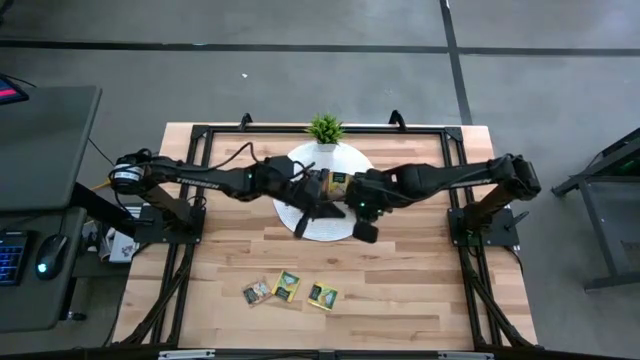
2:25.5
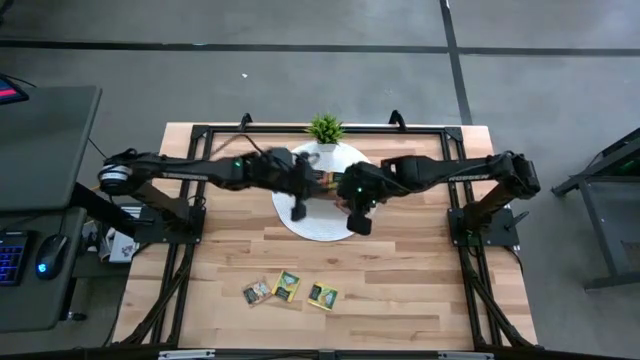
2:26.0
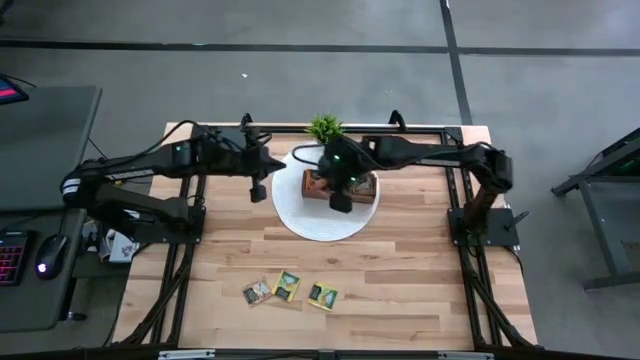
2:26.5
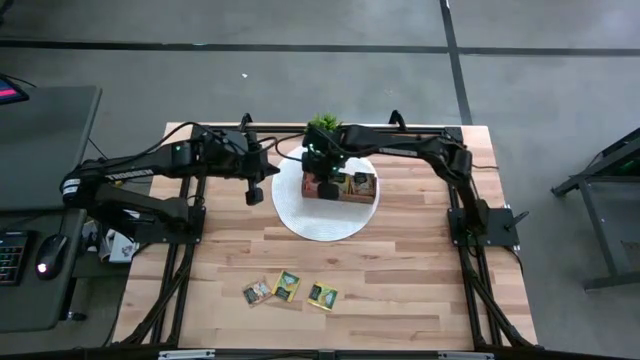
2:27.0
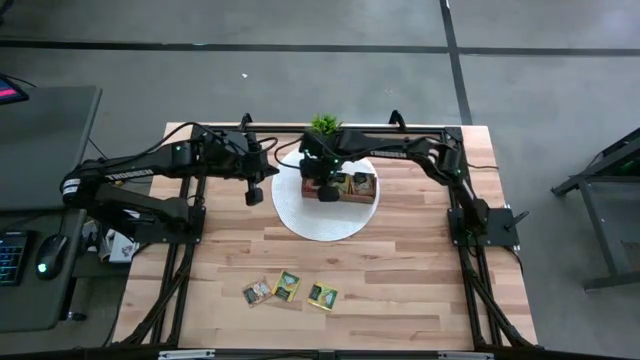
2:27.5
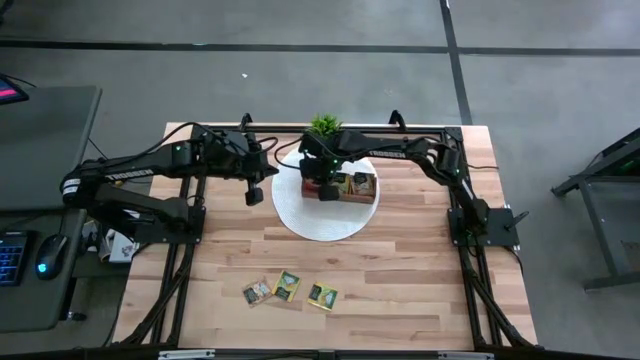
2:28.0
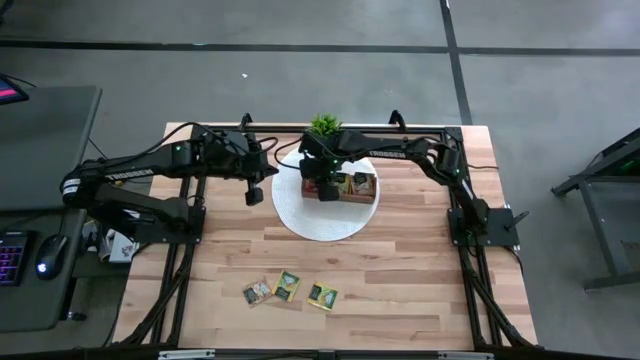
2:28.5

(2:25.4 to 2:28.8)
Task: Pick & Place Tea
Put the orange tea bag into the left section of the wooden organizer

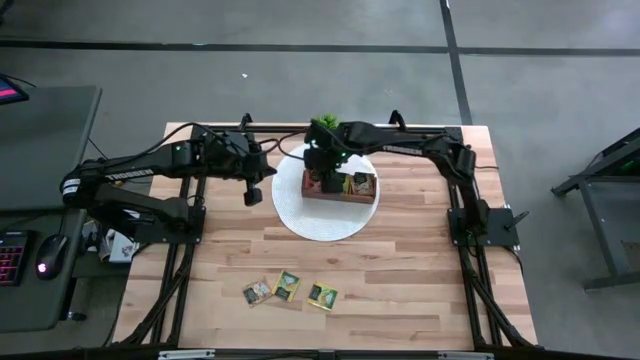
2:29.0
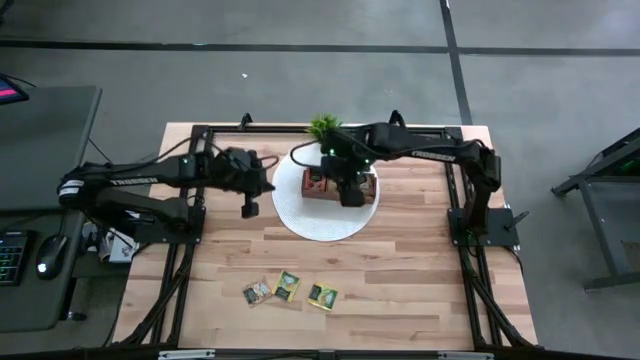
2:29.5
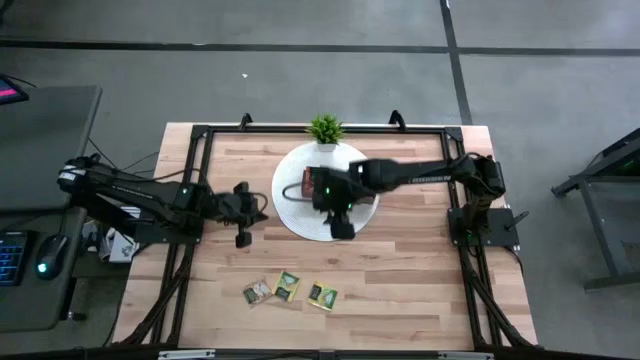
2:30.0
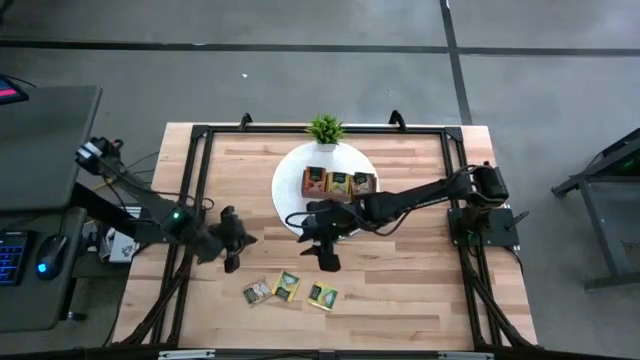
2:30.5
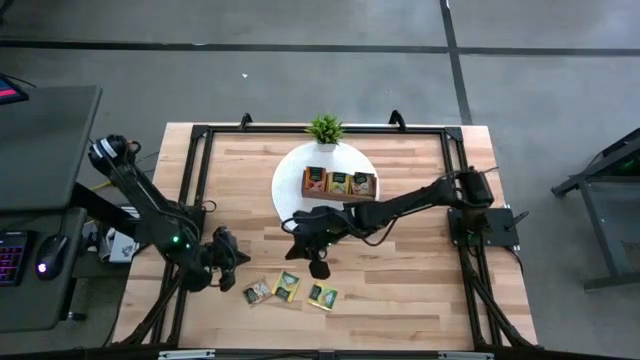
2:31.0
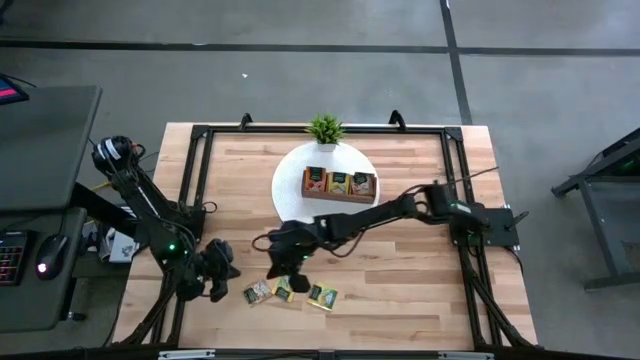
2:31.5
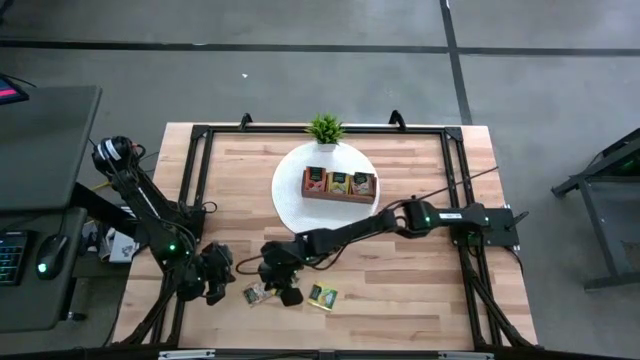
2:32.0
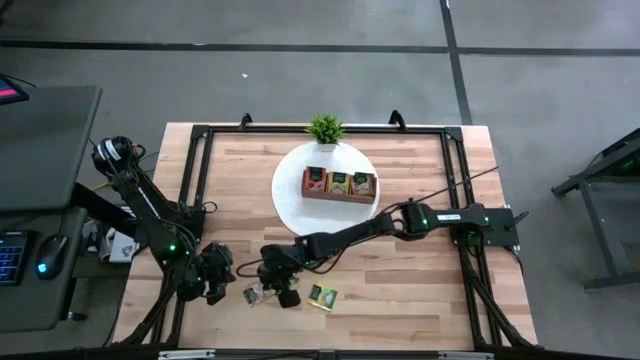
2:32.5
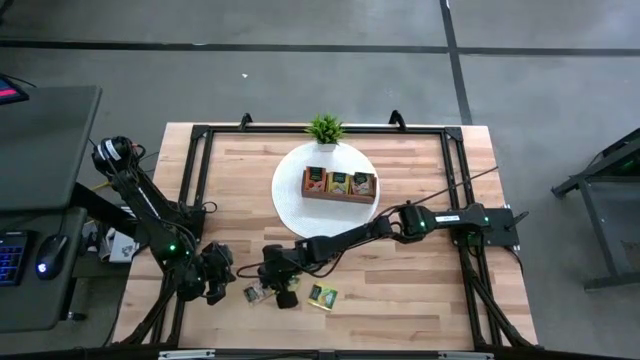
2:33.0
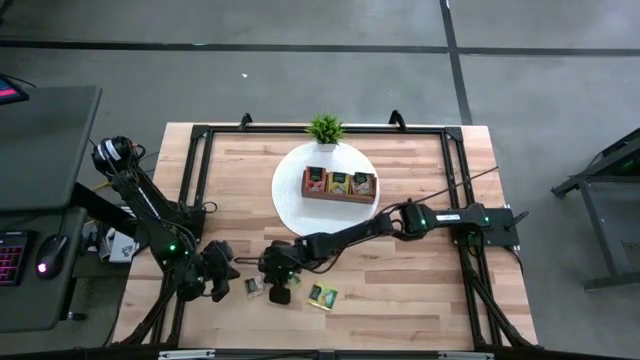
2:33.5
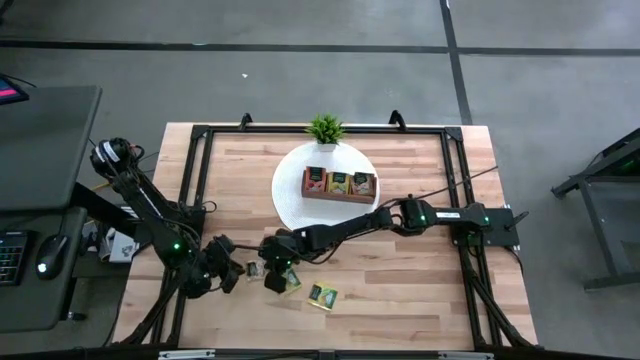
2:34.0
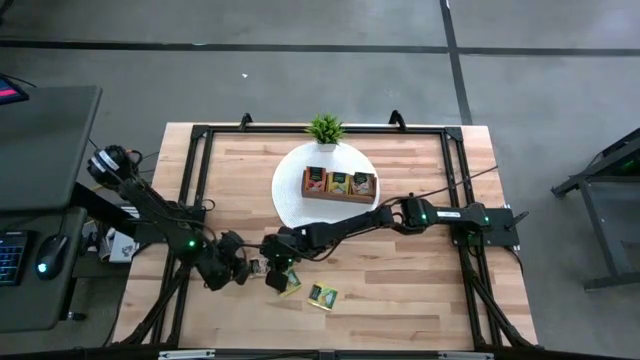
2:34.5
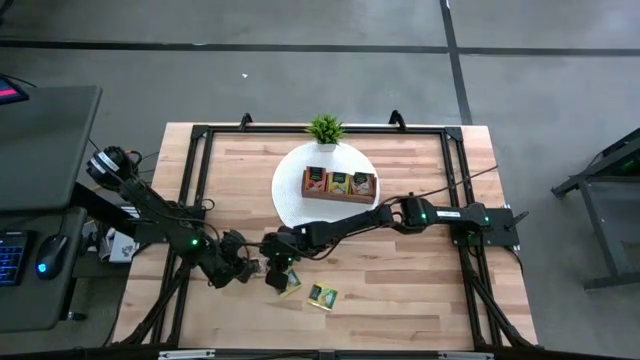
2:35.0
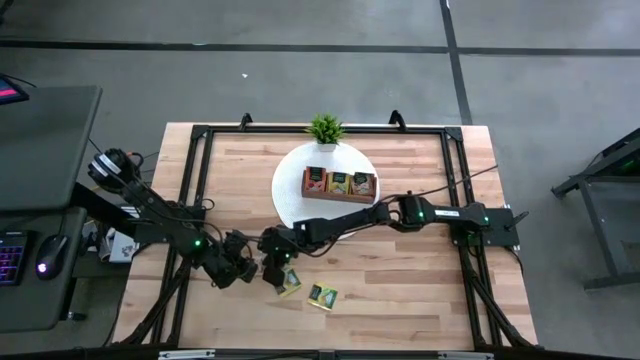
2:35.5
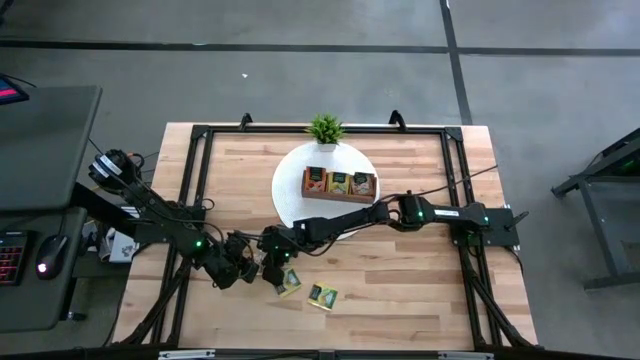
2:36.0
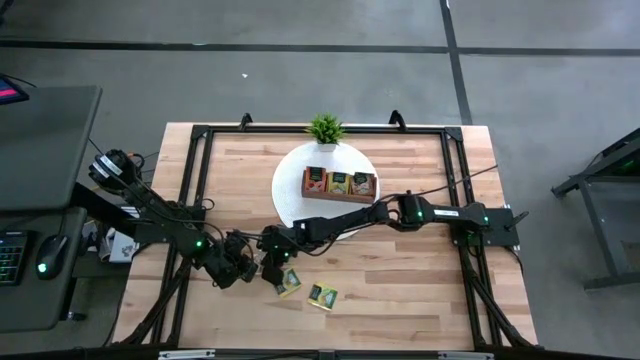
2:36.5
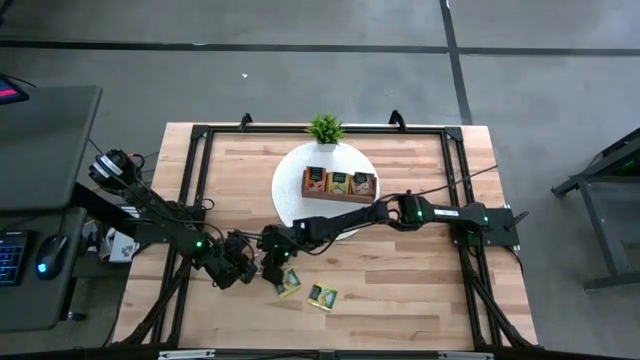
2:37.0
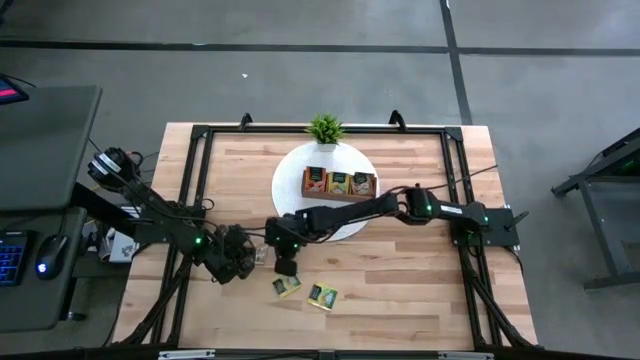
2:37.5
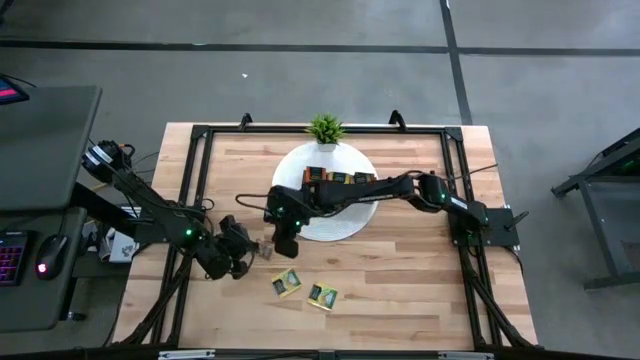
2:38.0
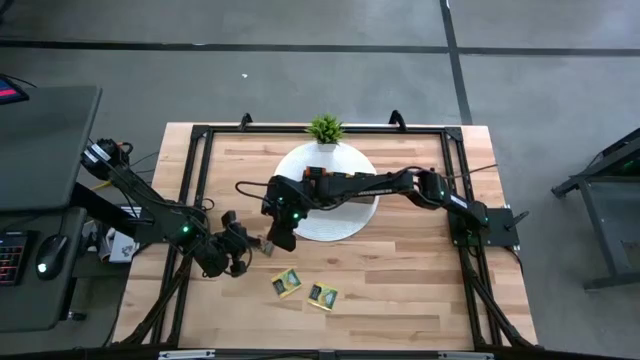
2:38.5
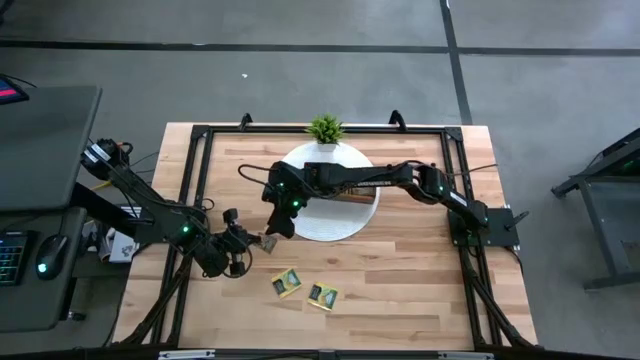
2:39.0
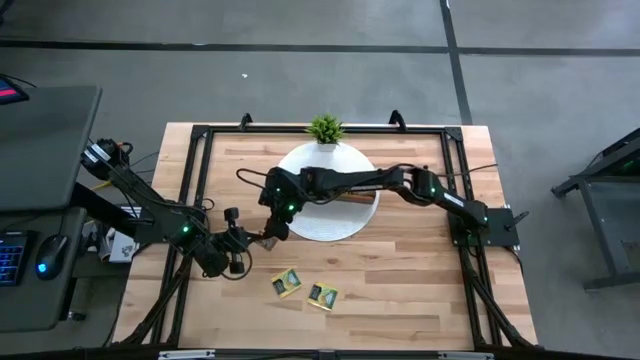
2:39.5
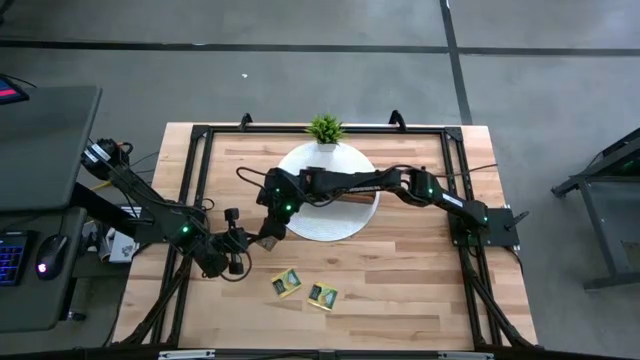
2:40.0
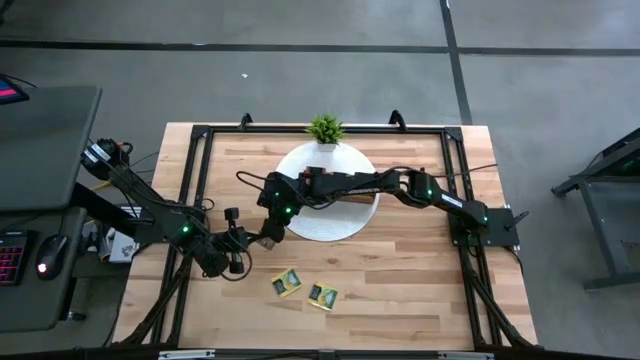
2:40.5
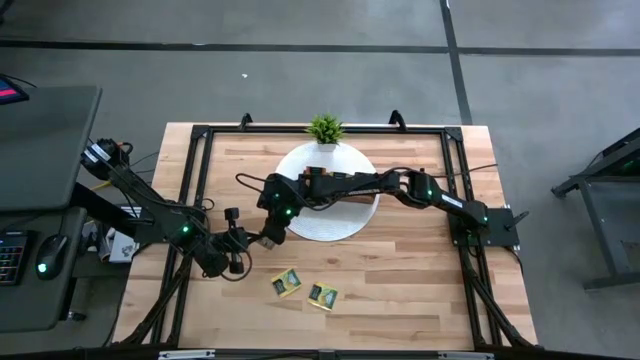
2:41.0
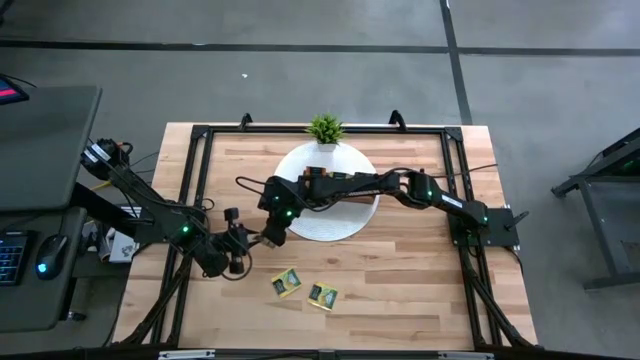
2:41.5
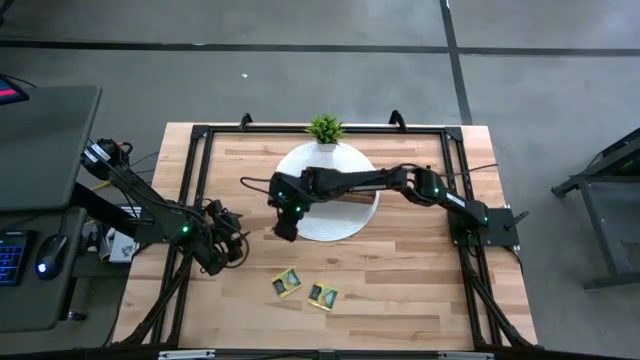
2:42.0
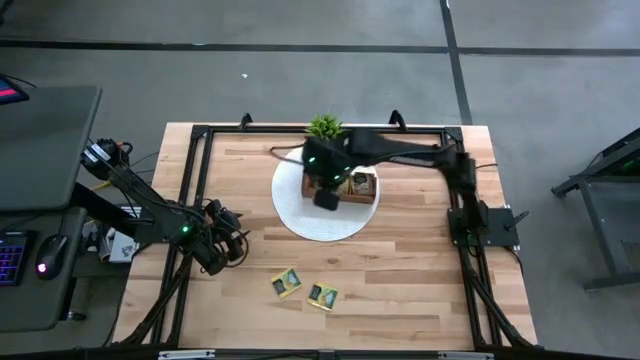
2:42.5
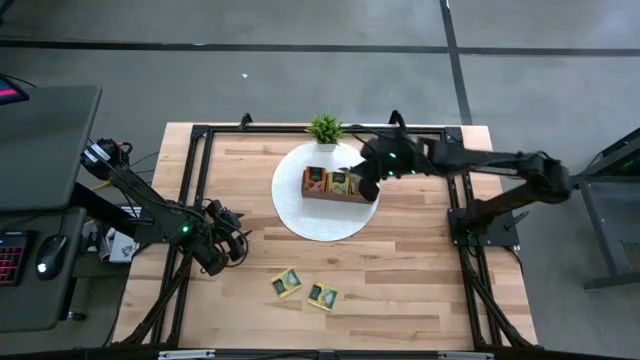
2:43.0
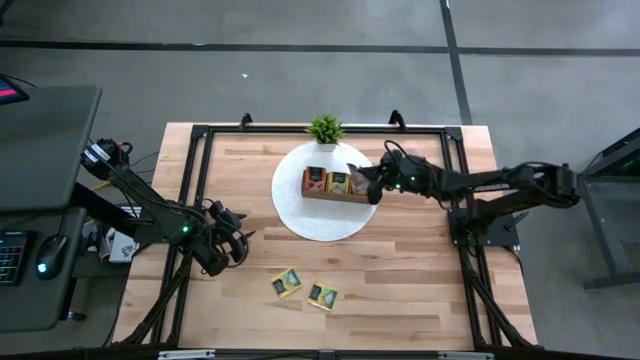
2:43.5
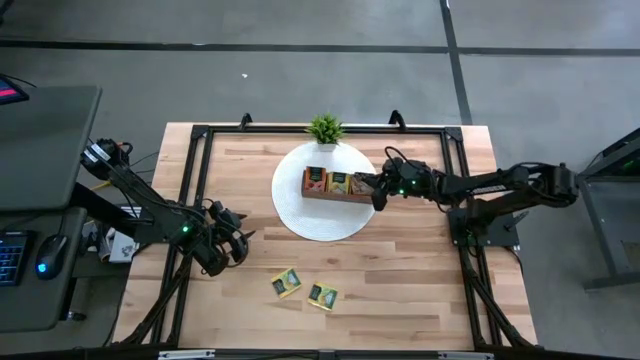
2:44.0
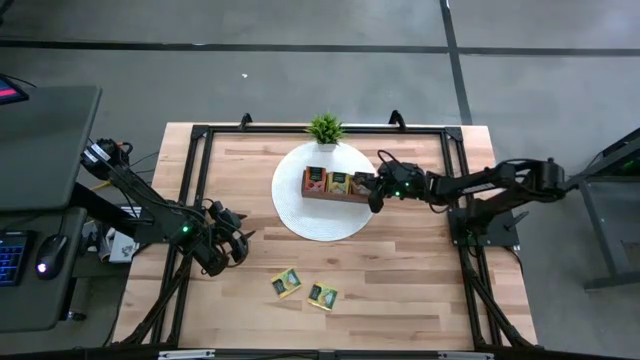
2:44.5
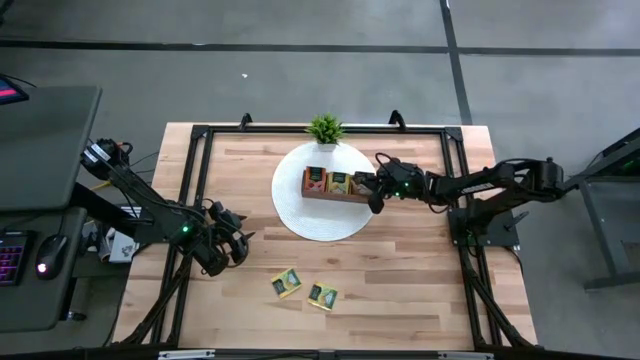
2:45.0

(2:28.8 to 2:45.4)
Put the brown tea bag into the right section of the wooden organizer

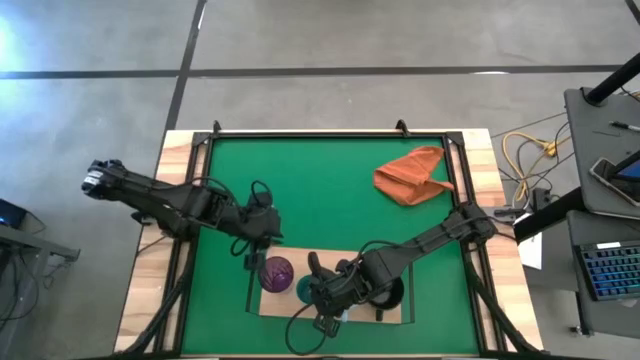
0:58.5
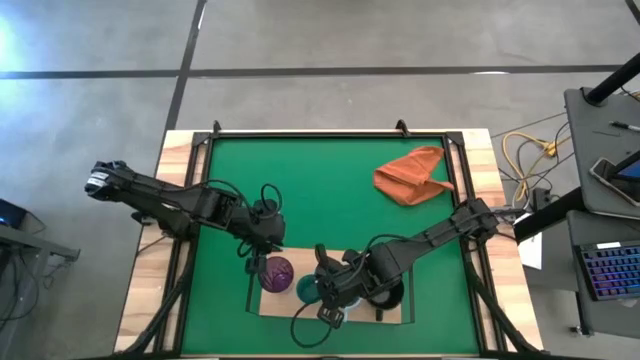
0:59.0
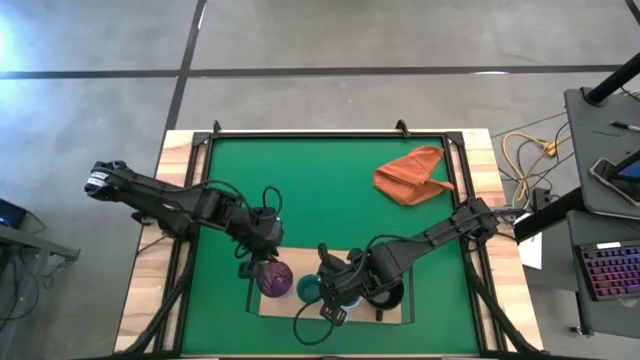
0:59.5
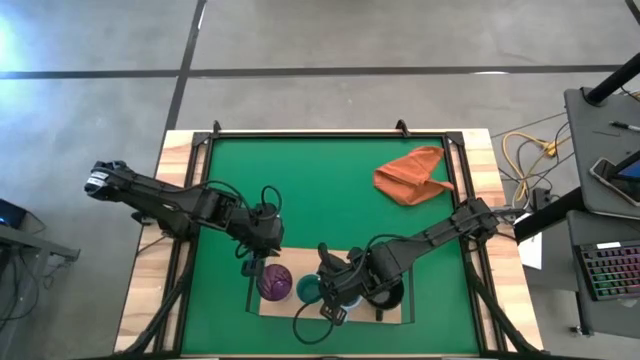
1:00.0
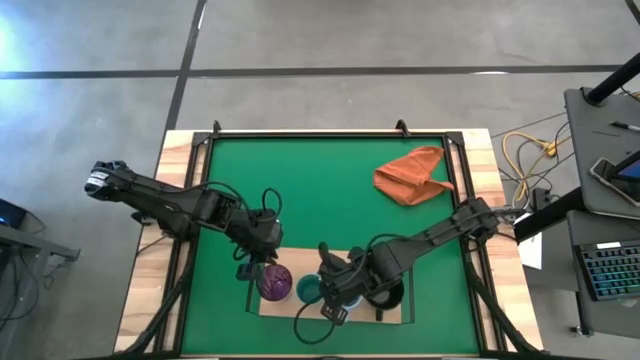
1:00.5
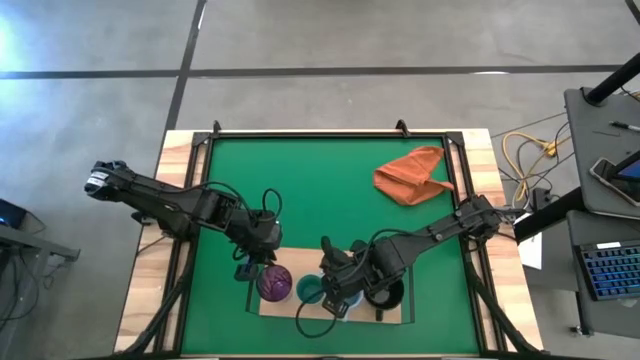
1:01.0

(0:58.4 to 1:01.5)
Task: Stack small to large cups/mugs on shelf
Adjust the violet cup
